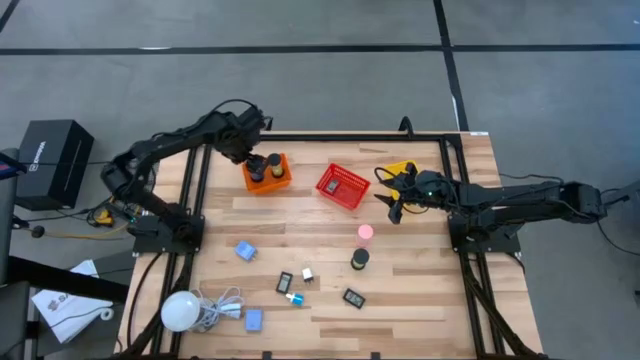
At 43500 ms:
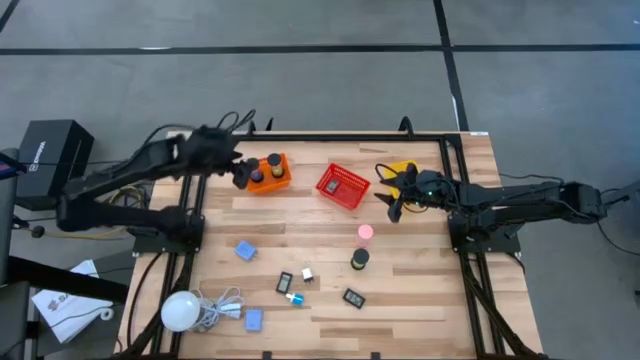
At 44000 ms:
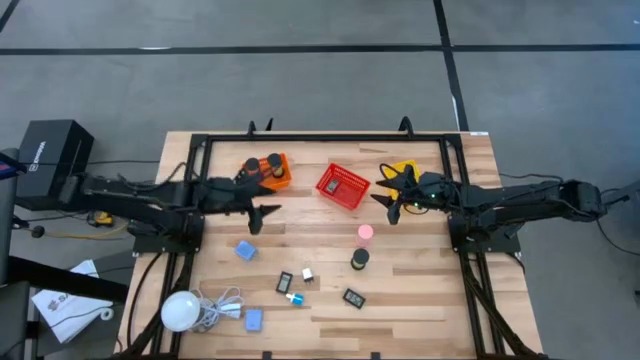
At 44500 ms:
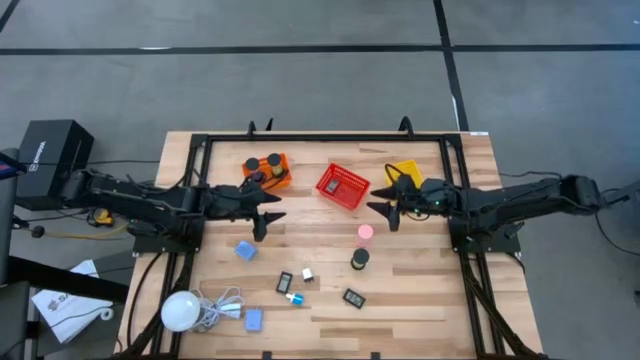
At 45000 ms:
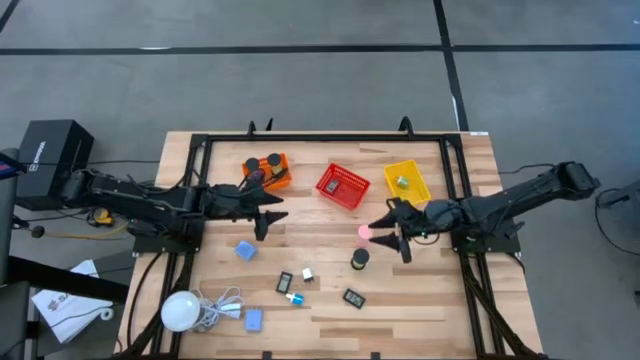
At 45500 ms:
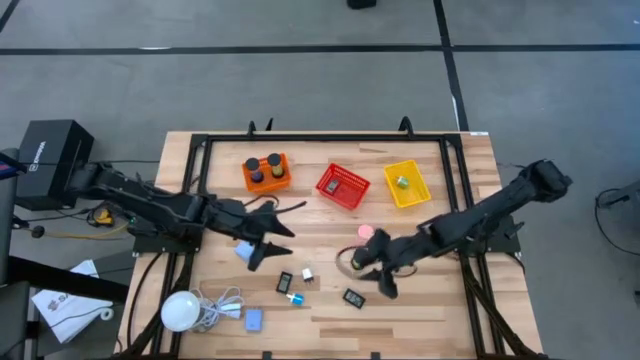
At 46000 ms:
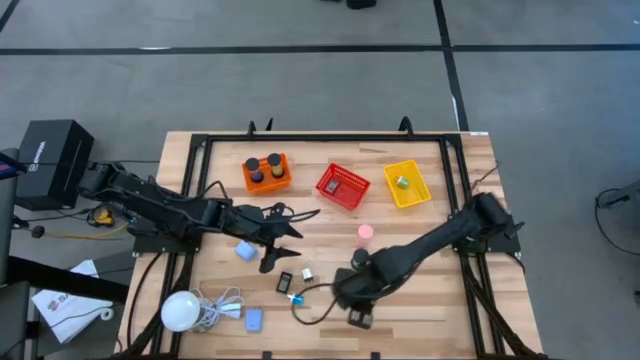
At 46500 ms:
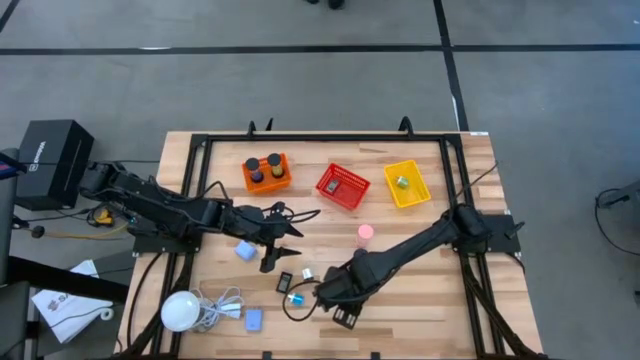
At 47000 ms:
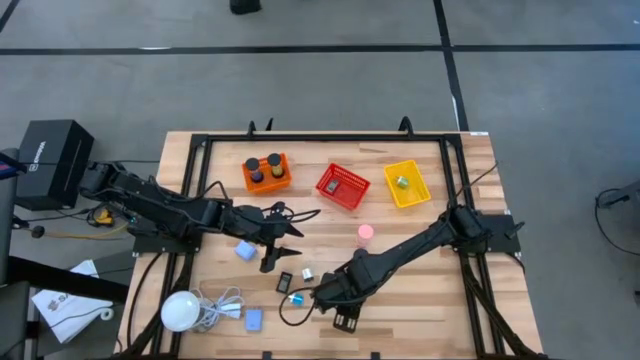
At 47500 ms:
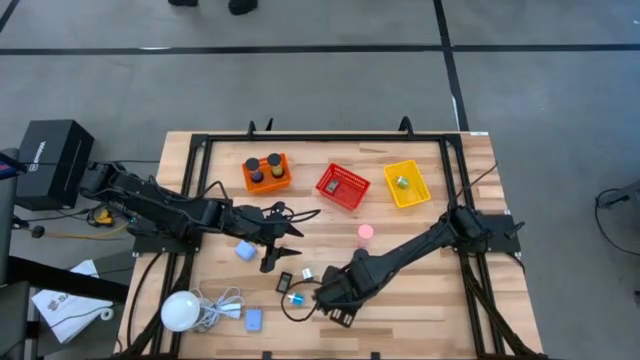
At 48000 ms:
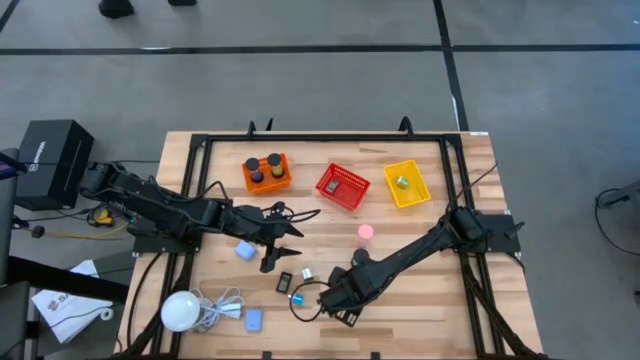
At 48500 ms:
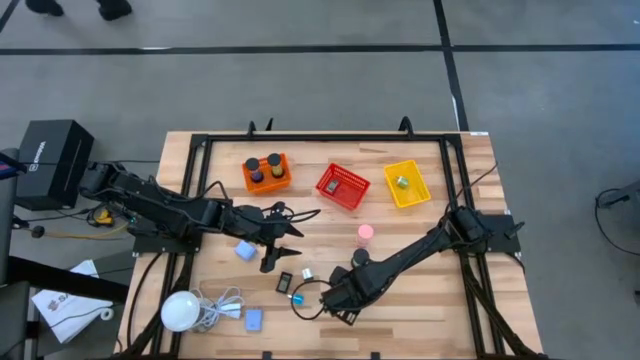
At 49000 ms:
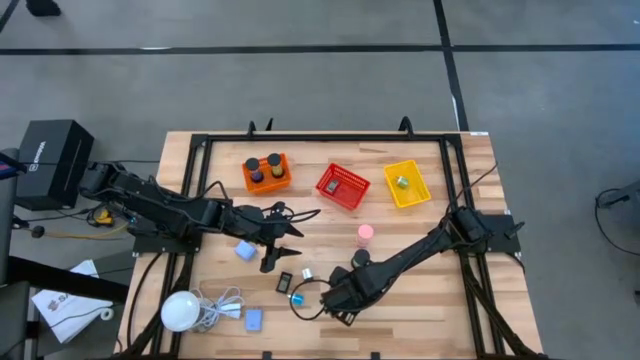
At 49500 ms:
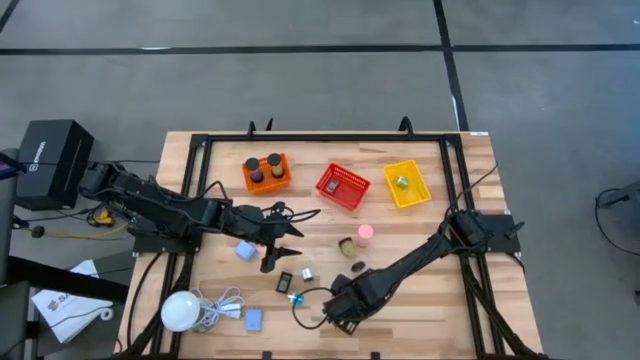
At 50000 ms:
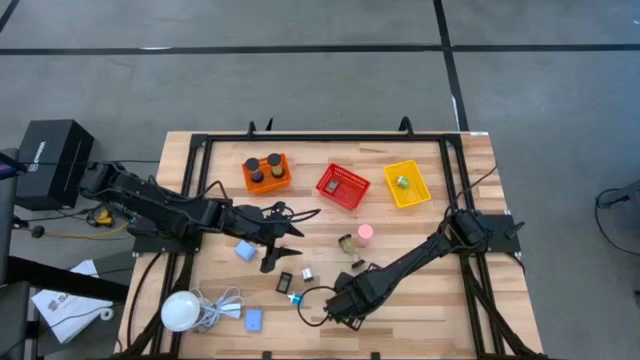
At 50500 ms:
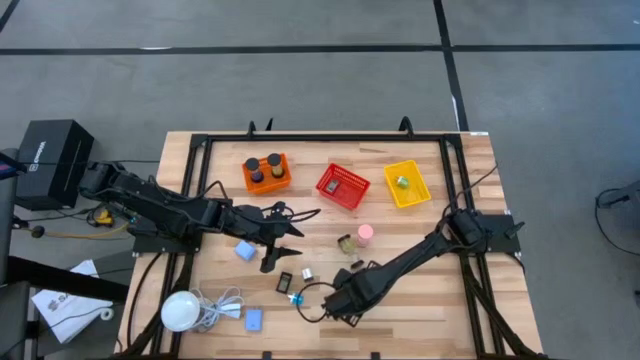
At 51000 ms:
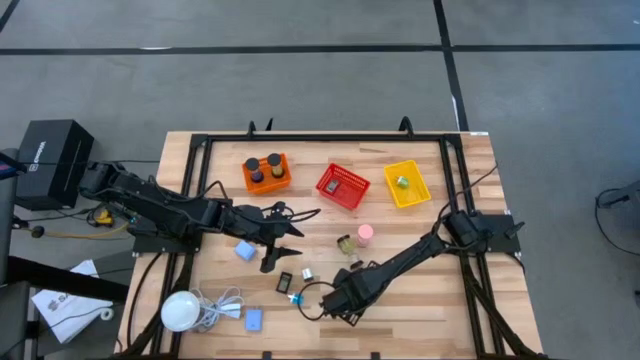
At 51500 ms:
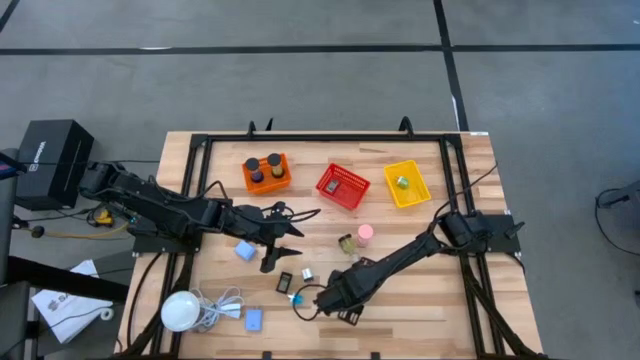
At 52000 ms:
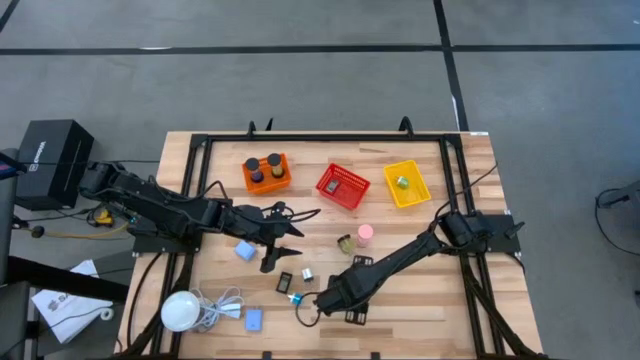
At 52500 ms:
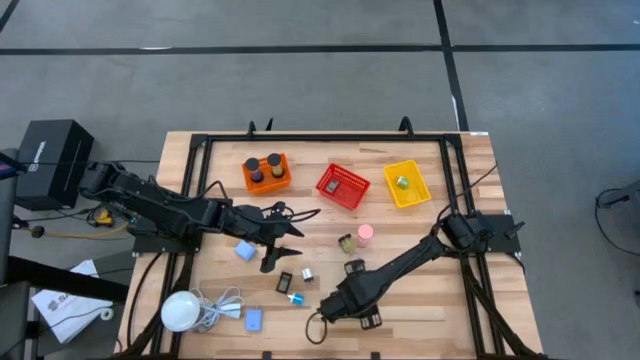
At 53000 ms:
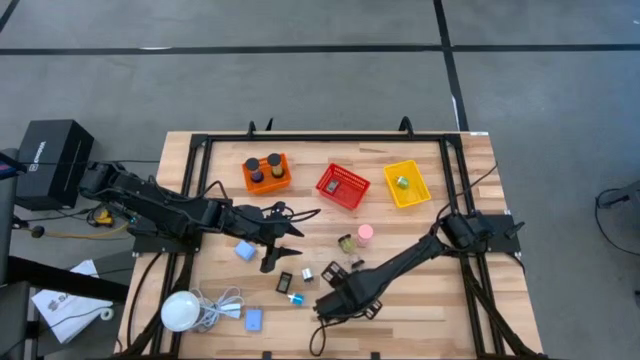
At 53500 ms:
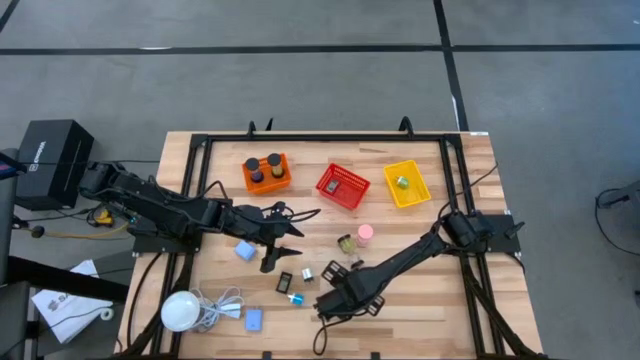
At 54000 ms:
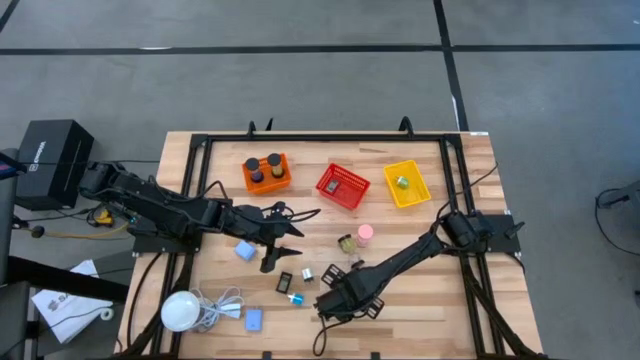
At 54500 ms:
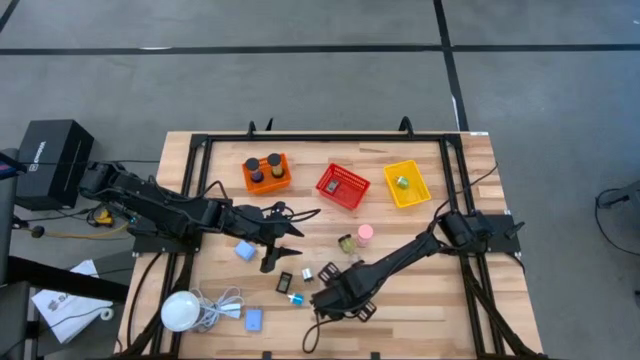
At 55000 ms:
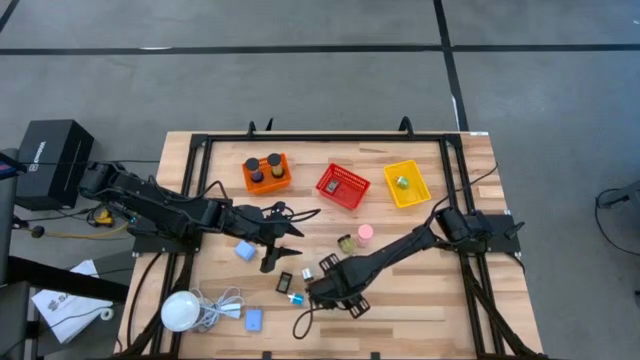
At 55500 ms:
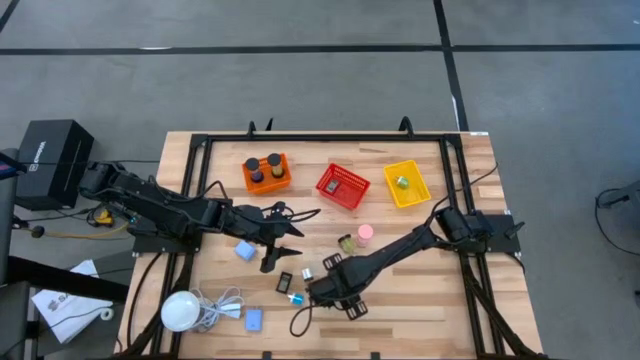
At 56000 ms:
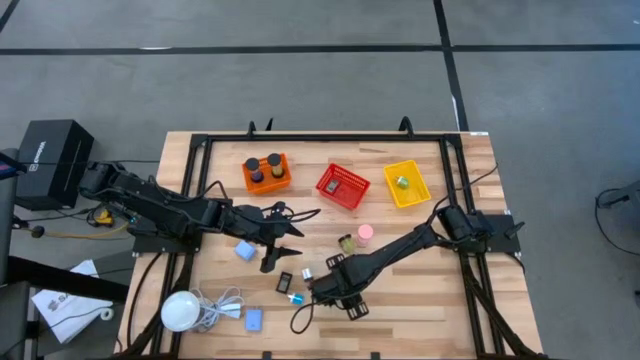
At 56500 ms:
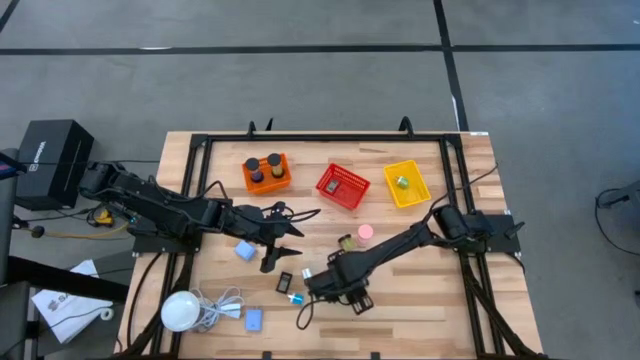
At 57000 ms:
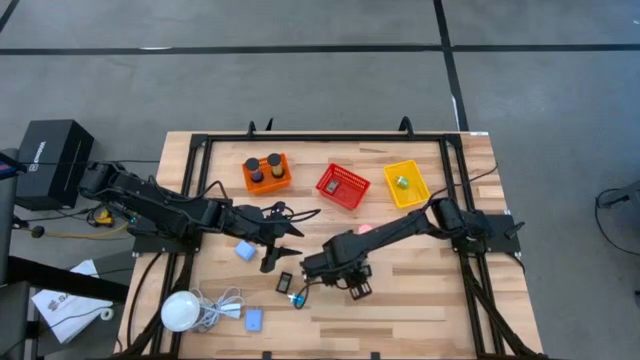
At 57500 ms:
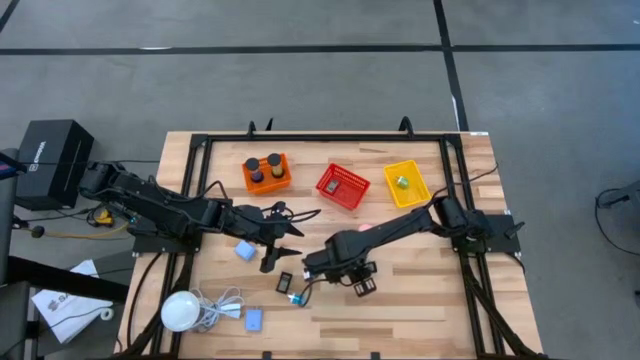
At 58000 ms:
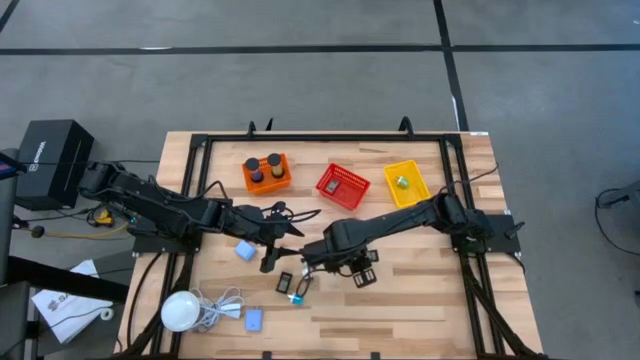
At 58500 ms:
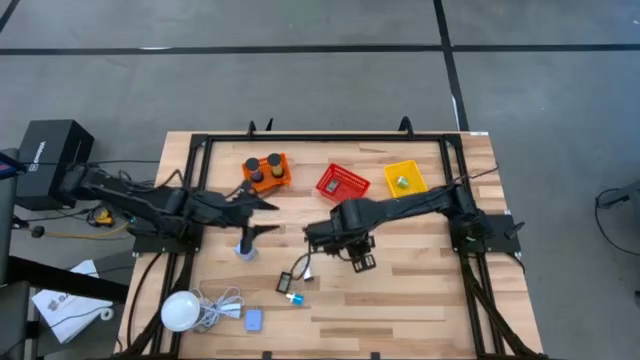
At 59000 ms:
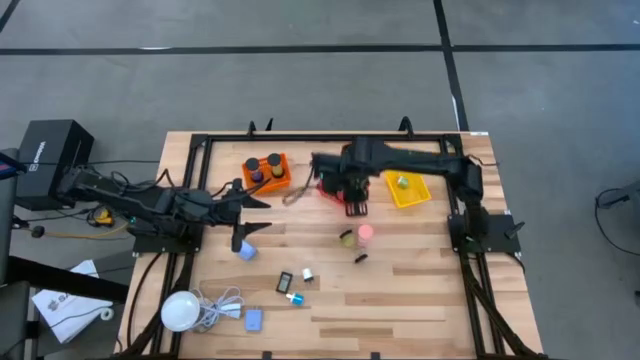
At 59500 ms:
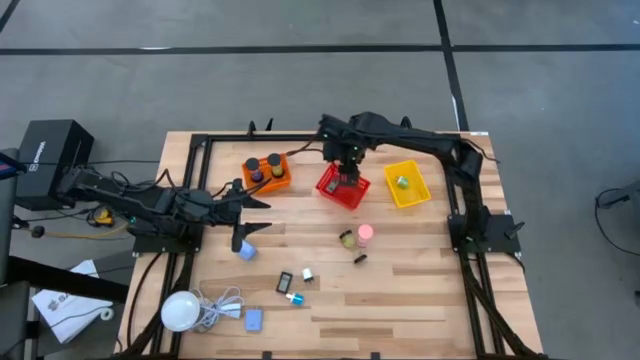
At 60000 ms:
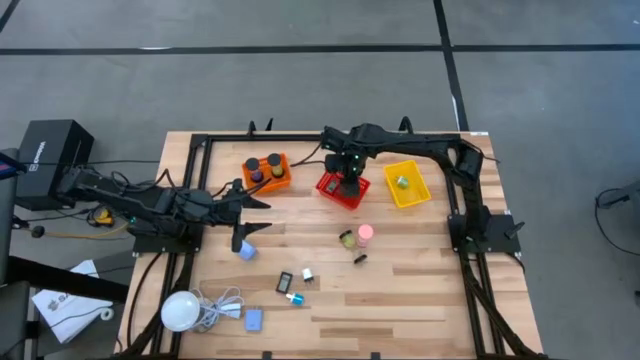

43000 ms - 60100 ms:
Task: Pick & Place Office items
Put the right black digital clock into the red bin
